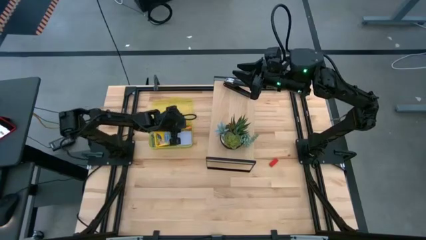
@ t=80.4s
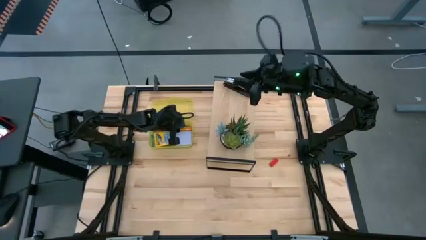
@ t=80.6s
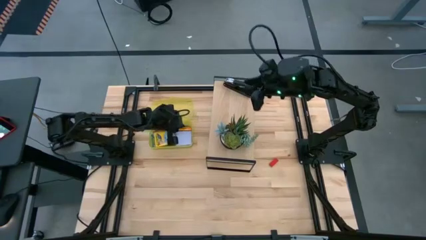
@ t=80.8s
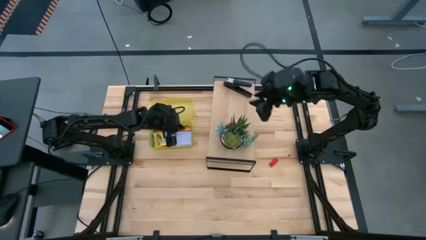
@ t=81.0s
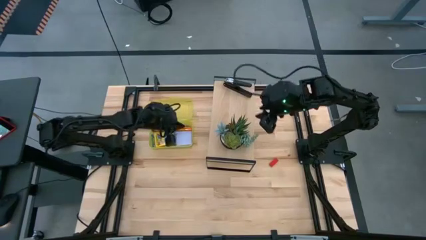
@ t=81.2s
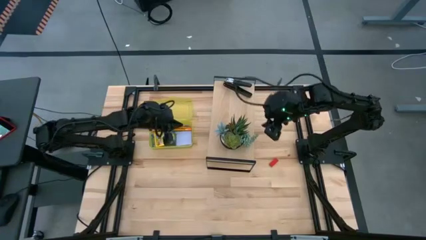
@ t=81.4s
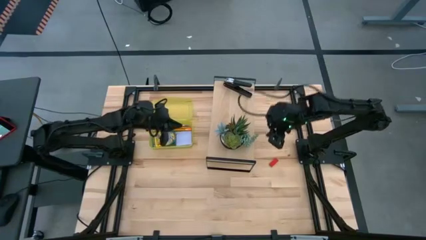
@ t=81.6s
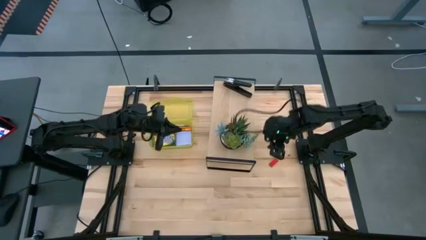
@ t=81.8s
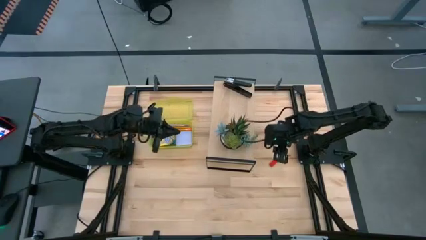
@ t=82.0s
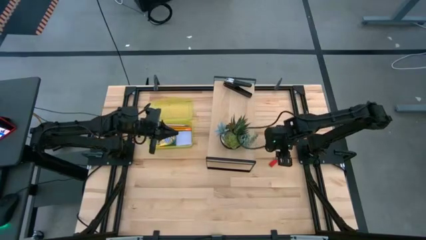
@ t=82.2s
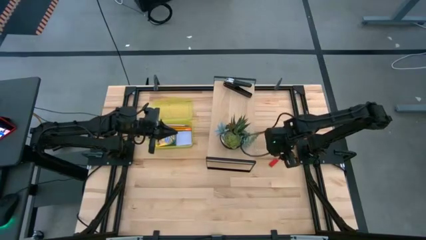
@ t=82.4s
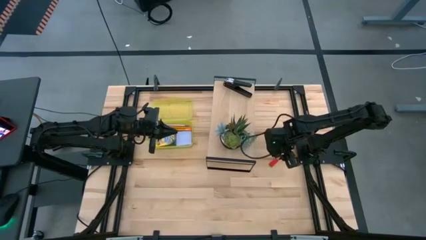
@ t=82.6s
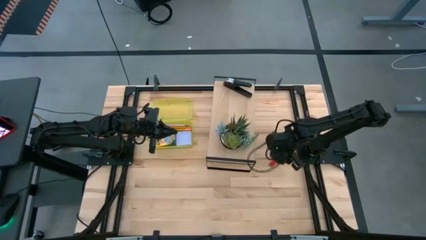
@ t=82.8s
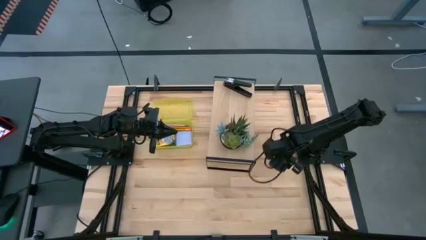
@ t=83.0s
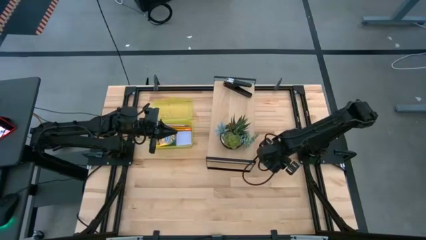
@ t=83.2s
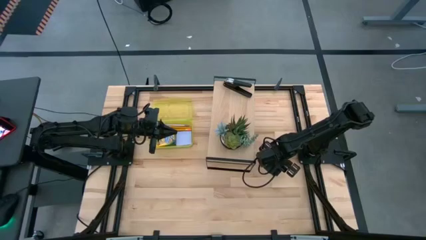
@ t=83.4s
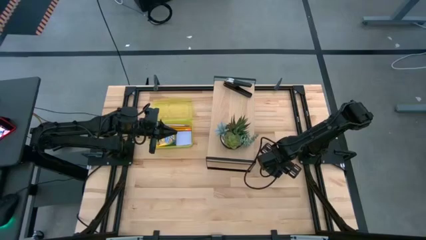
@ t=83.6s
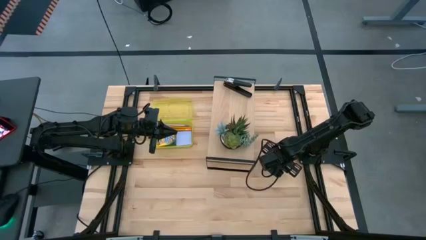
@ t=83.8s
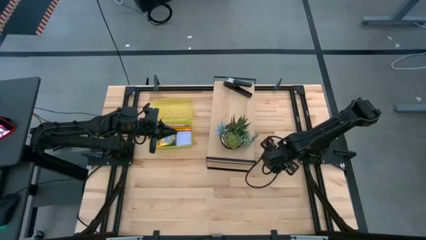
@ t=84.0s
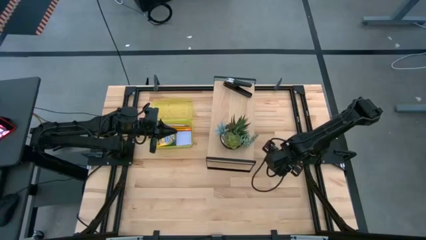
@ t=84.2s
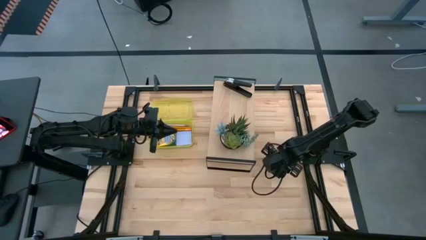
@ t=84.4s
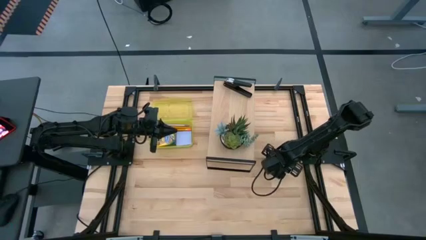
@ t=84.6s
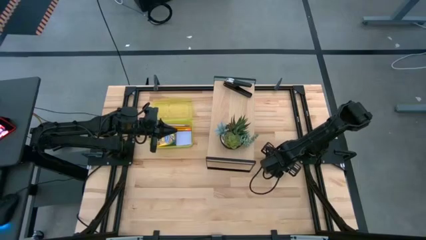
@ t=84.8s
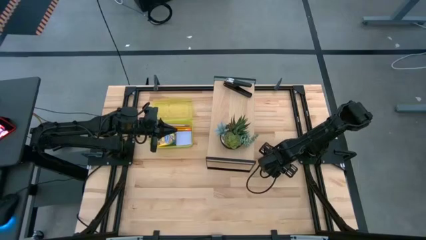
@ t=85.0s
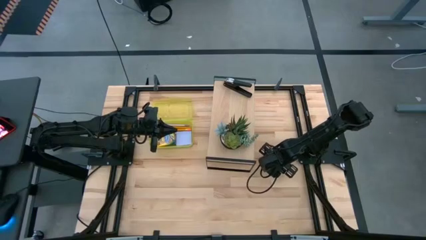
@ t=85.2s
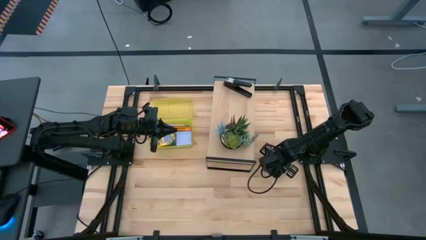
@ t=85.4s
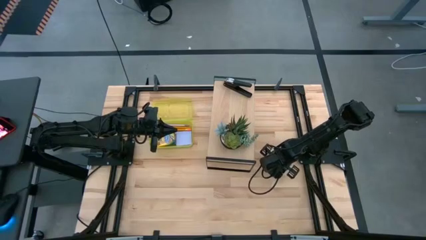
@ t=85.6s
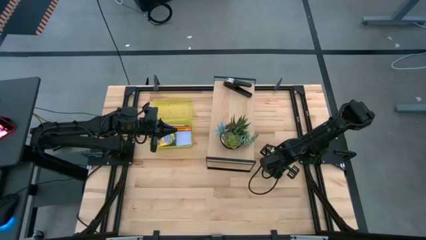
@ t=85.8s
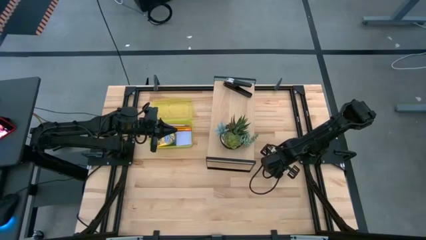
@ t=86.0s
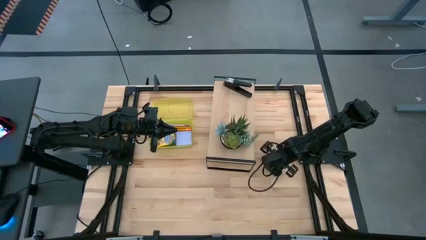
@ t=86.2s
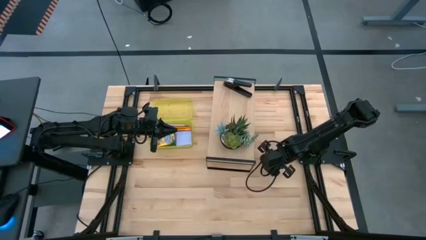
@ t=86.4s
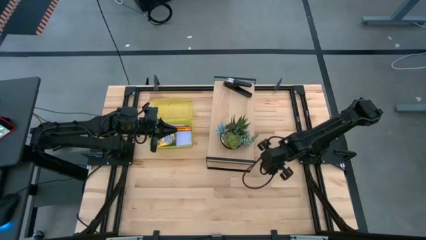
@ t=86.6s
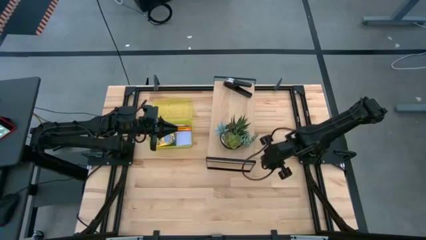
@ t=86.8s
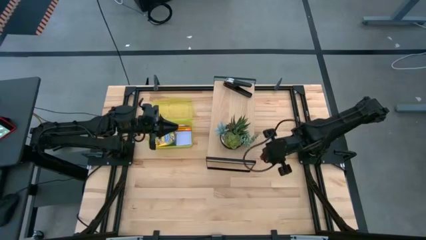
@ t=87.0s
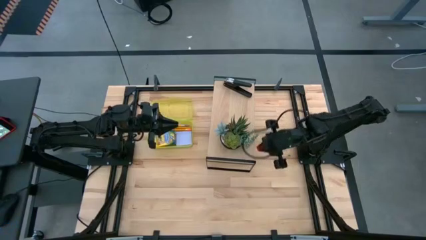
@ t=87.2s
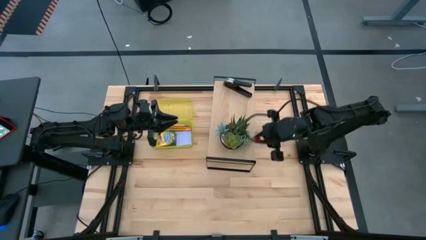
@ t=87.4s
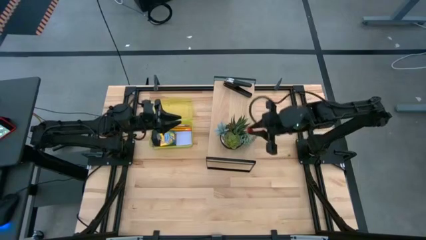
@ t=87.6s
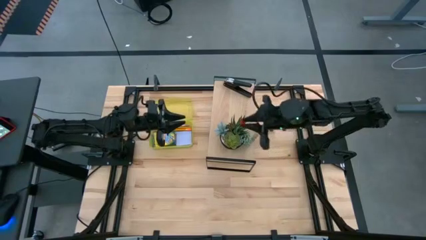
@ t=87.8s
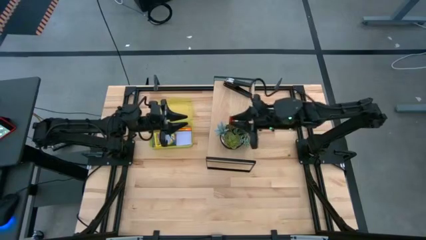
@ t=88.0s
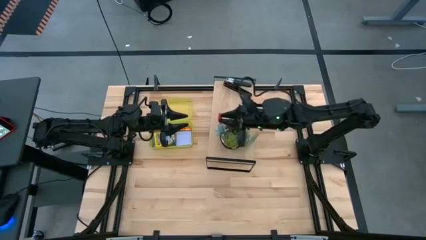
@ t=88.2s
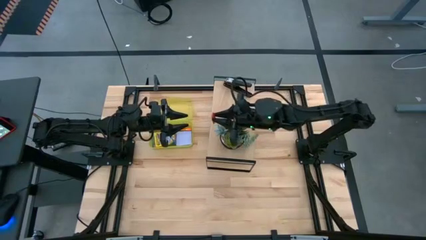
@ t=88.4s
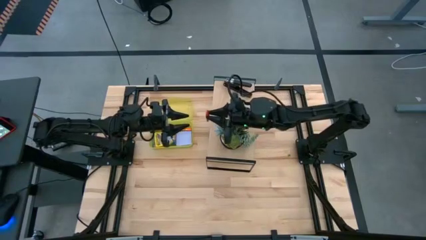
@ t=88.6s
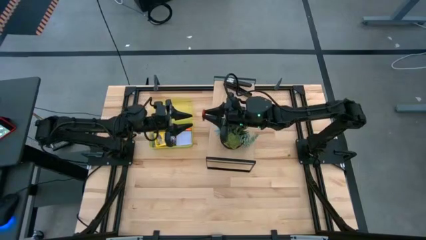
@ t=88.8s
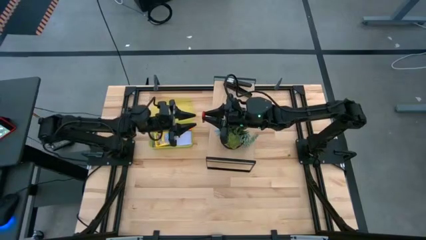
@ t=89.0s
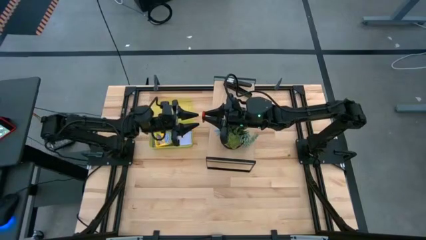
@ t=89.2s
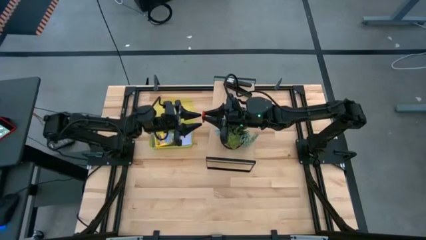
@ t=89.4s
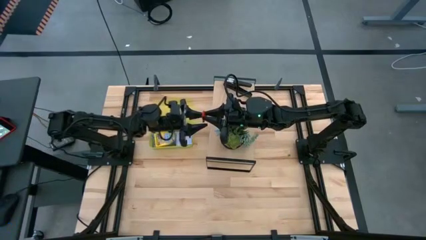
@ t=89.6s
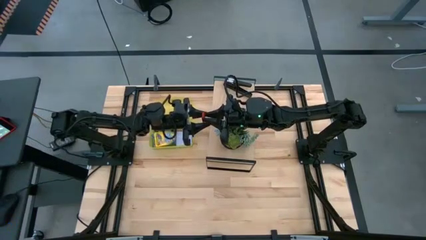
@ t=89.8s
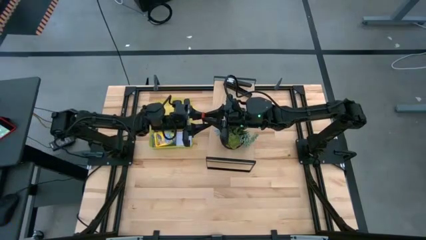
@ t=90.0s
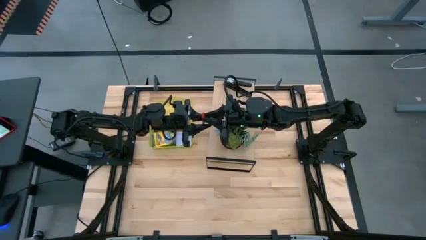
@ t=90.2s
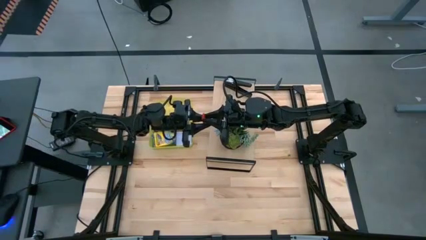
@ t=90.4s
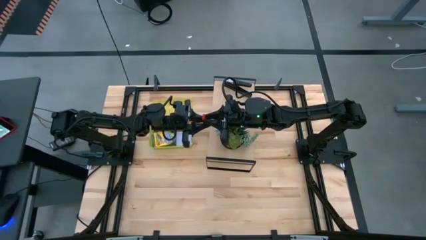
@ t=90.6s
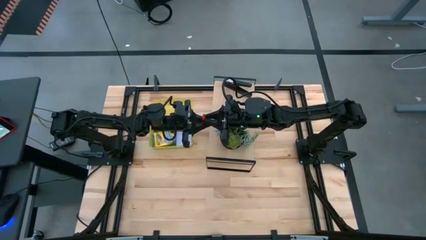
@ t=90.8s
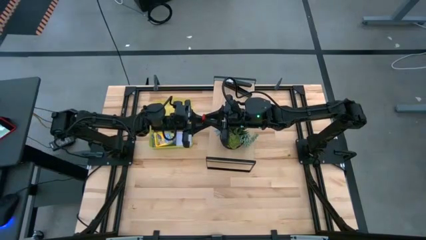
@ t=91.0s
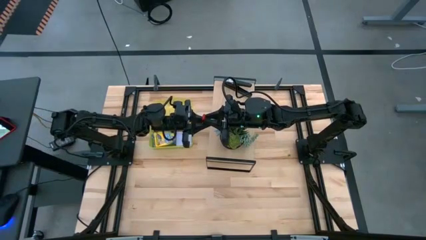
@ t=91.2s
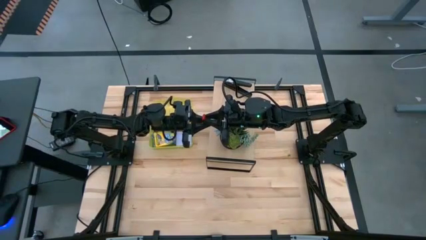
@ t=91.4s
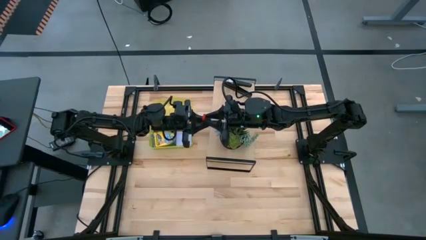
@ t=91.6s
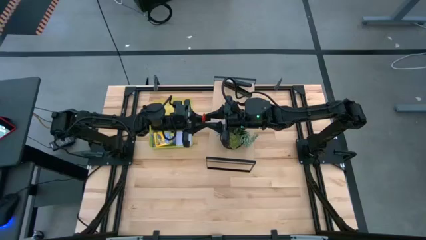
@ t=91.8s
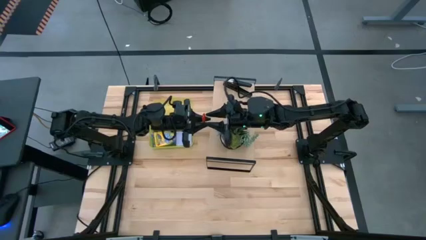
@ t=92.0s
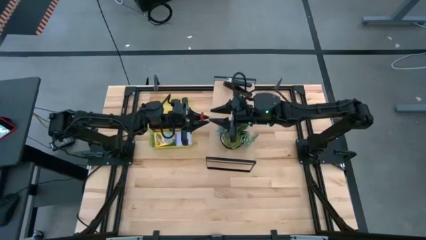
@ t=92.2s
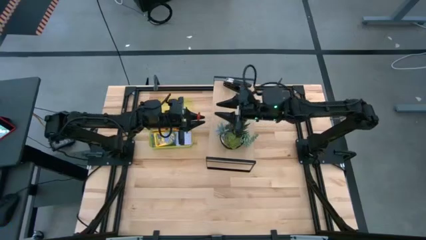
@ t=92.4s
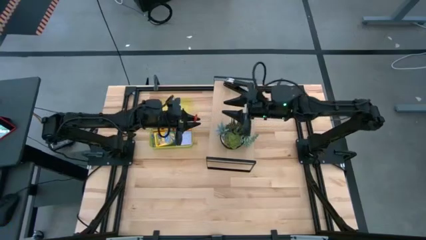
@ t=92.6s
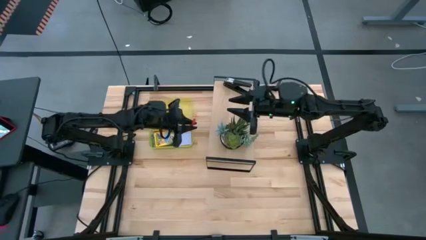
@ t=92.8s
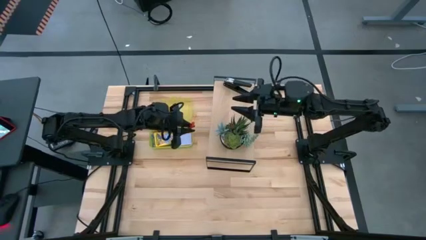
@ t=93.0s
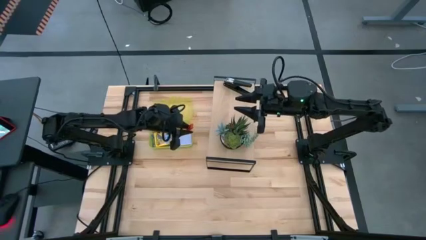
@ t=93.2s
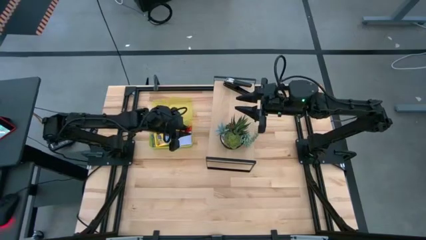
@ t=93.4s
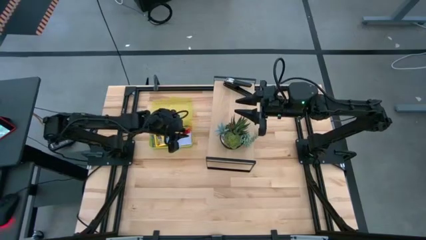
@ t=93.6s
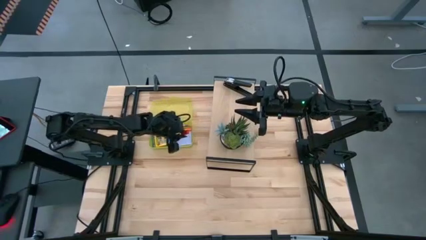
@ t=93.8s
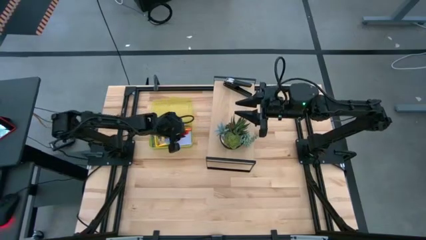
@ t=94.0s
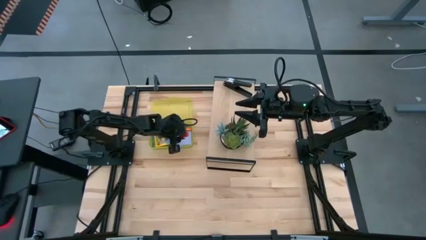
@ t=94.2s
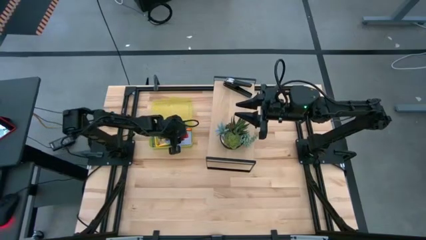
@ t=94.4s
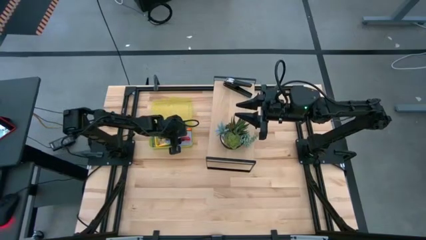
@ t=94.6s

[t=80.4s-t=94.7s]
Task: Pack school essentials
Put the red eraser into the yellow supply box
